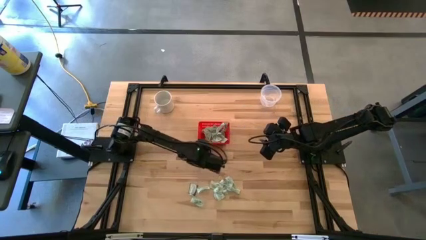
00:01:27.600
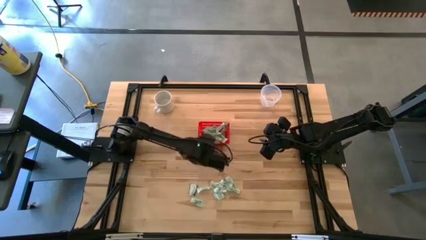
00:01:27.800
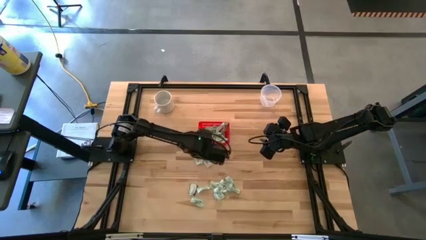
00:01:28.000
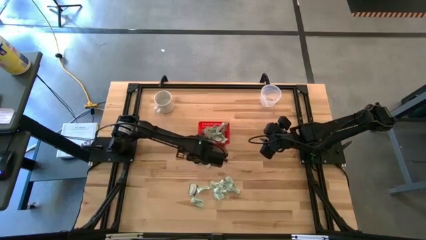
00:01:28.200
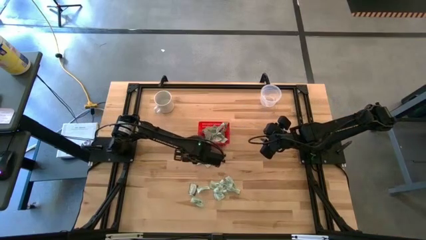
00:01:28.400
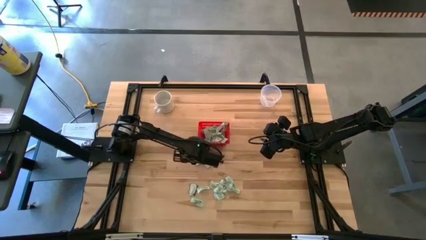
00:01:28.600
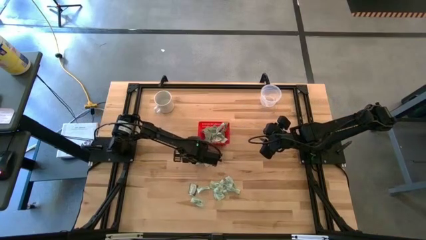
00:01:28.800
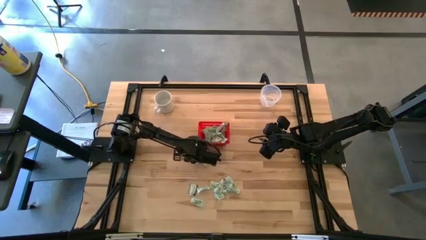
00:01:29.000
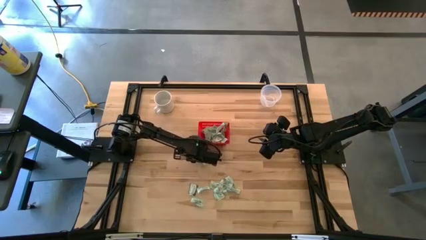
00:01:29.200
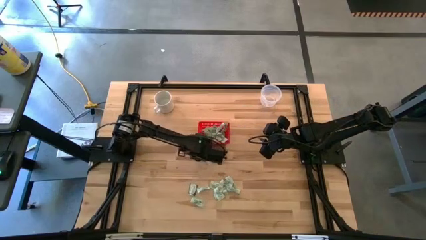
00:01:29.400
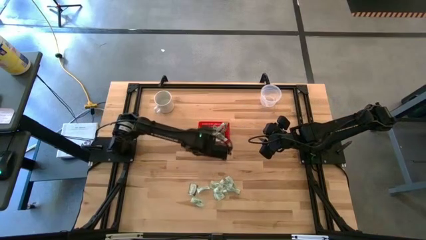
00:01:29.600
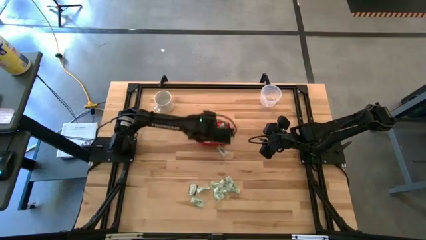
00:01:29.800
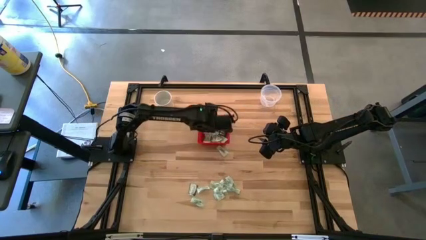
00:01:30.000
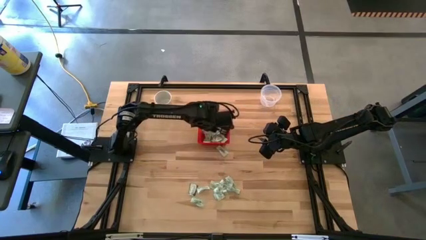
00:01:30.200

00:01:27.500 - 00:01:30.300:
Task: Pick and place items into bin
Put the stevia packet into the red bin

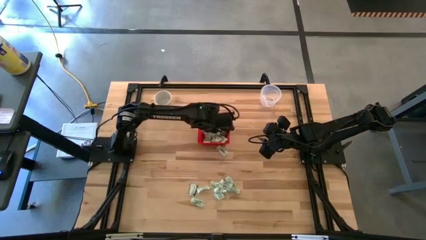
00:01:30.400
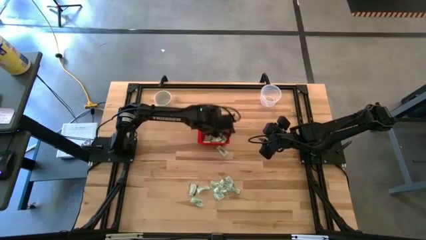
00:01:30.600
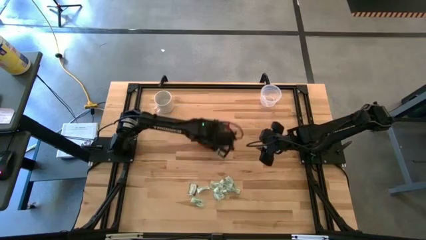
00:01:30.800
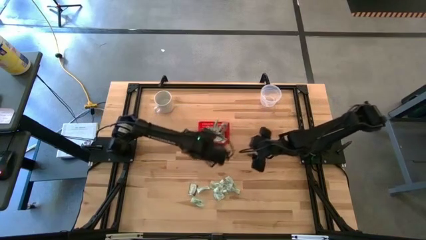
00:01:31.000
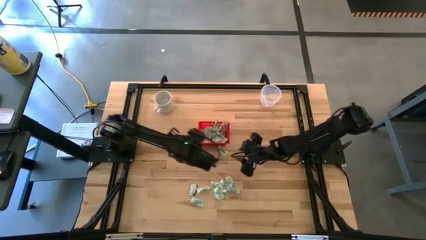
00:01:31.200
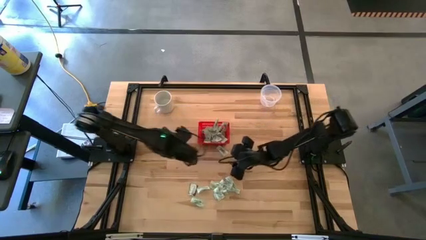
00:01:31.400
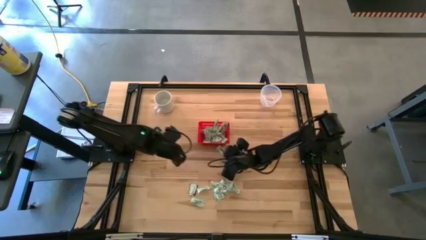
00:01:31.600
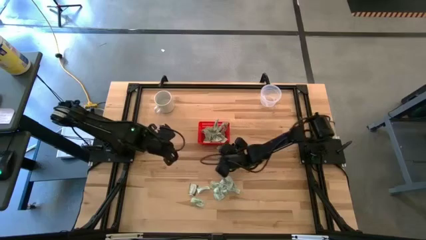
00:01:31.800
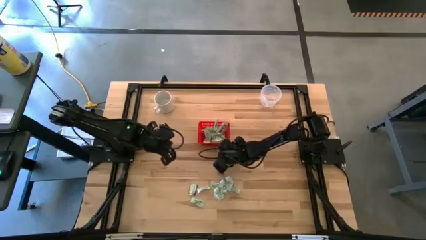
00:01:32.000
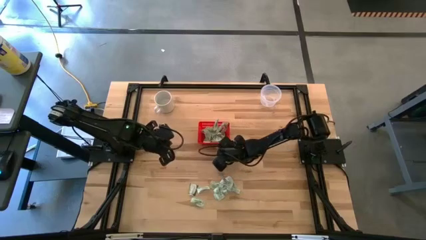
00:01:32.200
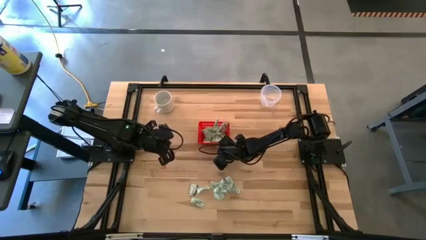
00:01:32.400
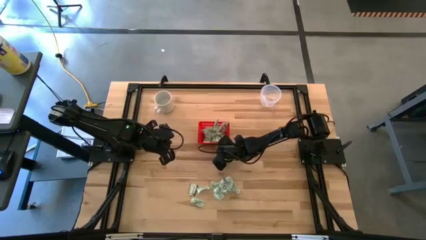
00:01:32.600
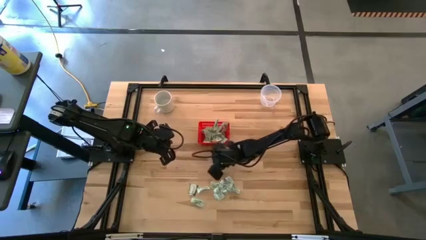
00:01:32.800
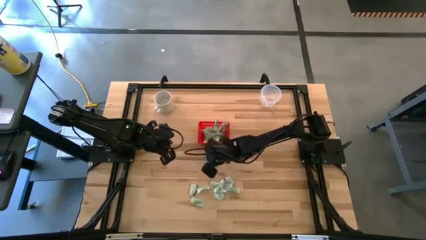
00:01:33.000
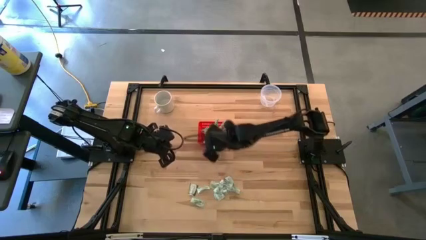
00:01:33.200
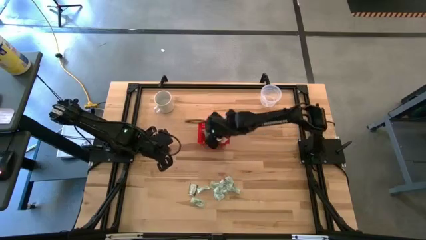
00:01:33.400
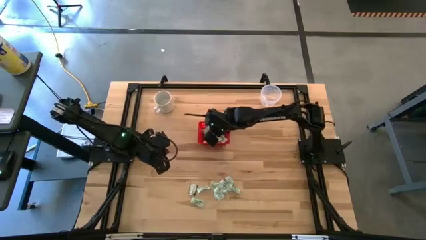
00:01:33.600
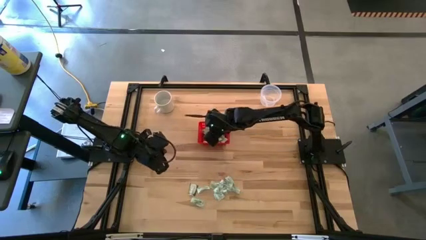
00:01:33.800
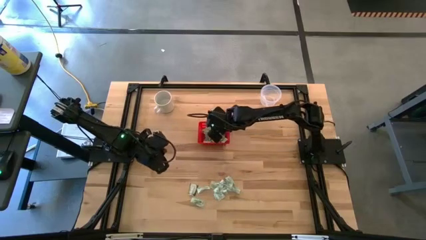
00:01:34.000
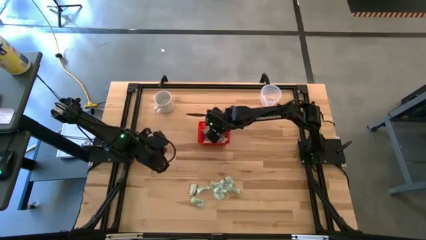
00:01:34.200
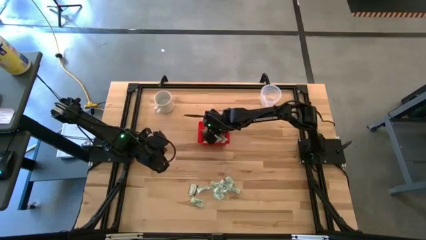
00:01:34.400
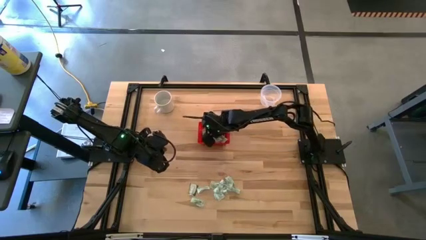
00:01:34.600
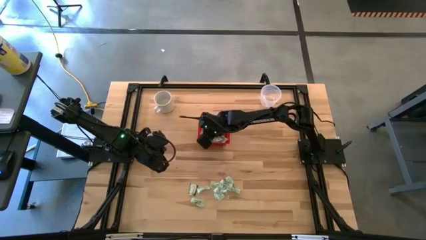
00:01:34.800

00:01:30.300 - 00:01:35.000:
Put the stevia packet into the red bin

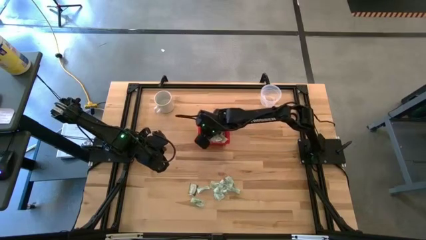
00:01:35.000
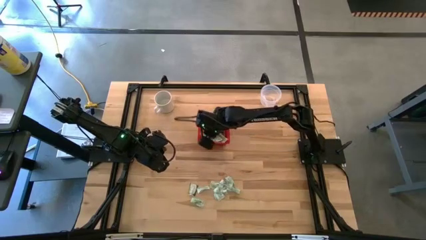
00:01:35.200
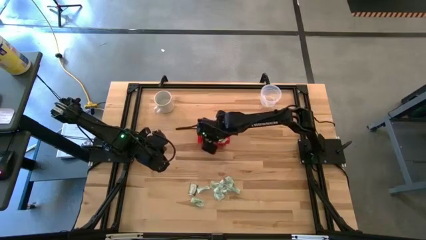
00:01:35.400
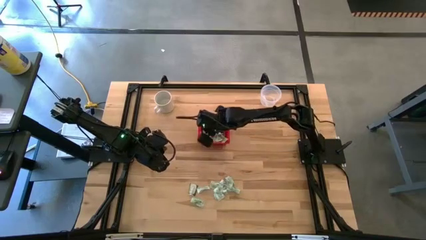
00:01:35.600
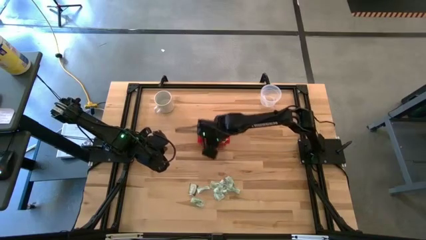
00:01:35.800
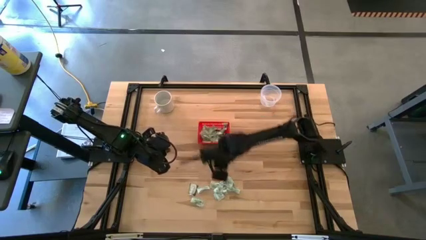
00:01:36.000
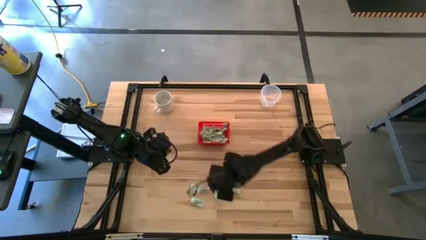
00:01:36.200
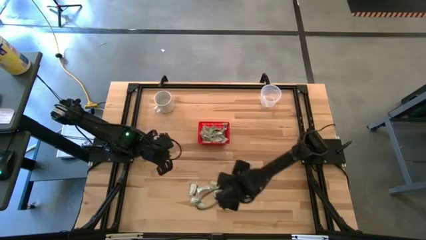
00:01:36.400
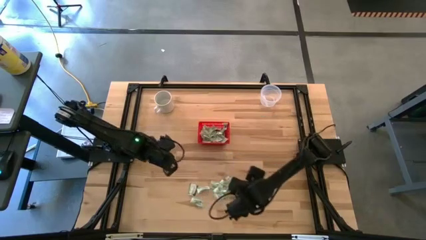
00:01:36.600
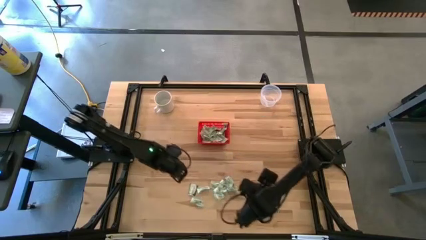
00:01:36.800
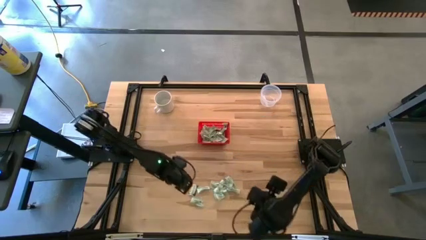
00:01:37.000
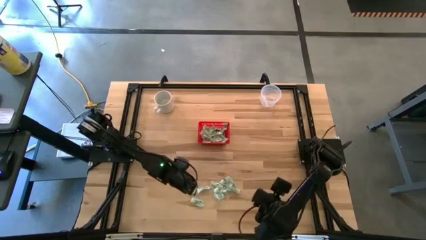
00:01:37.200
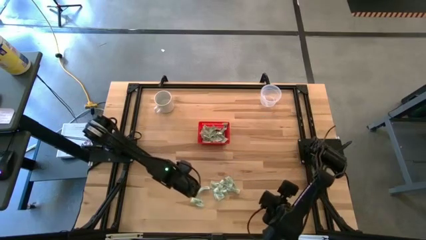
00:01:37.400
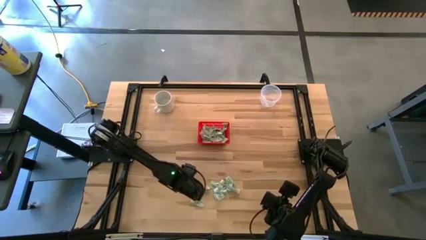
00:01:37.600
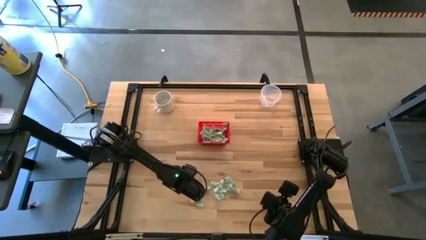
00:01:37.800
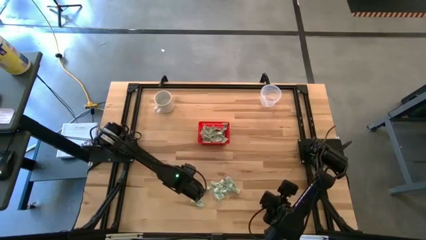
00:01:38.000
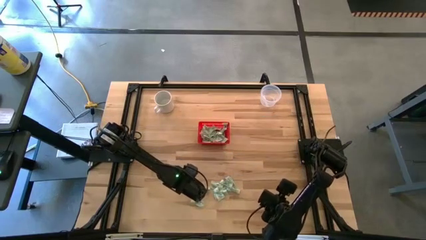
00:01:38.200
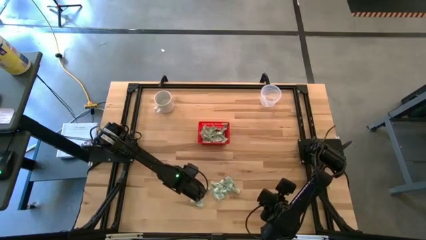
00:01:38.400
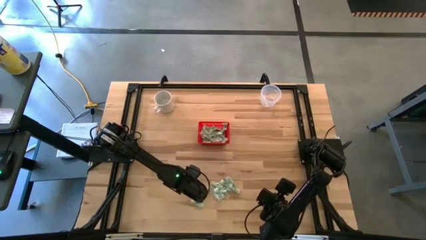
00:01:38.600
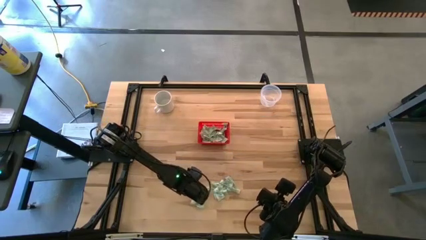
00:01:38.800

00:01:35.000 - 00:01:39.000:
Put the truvia packet into the red bin

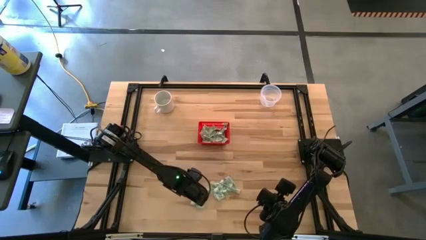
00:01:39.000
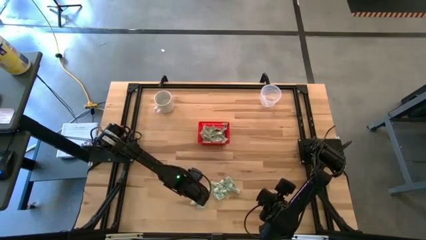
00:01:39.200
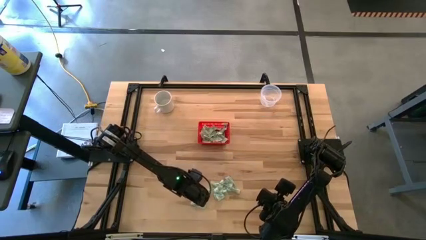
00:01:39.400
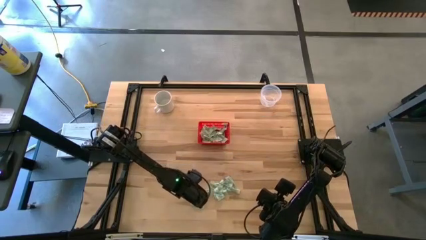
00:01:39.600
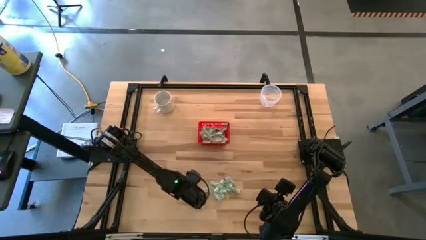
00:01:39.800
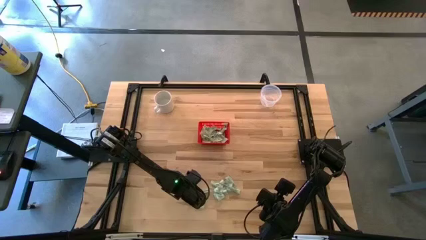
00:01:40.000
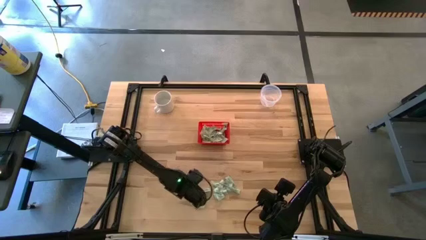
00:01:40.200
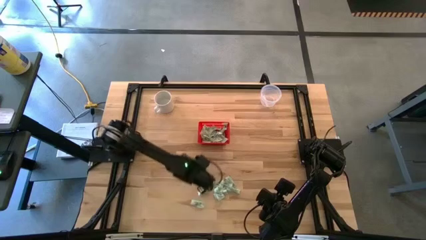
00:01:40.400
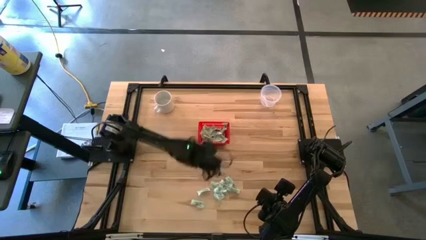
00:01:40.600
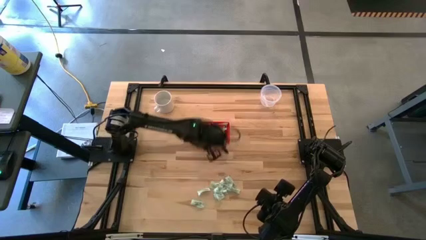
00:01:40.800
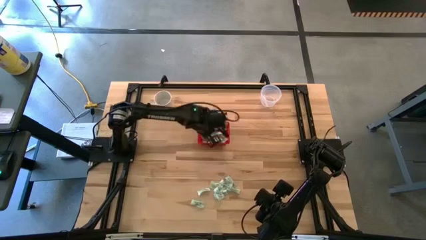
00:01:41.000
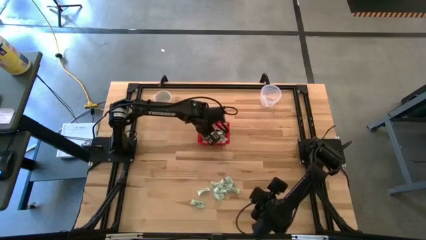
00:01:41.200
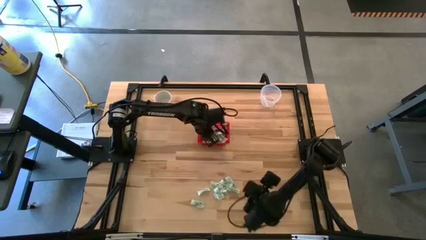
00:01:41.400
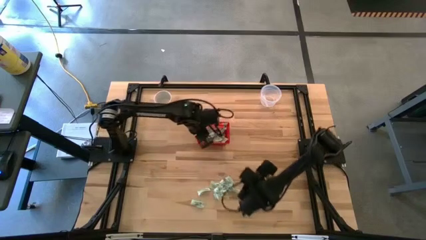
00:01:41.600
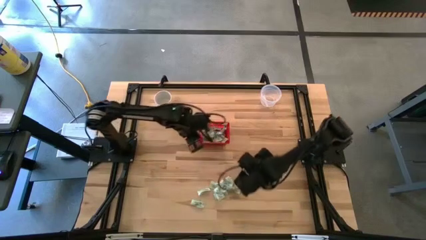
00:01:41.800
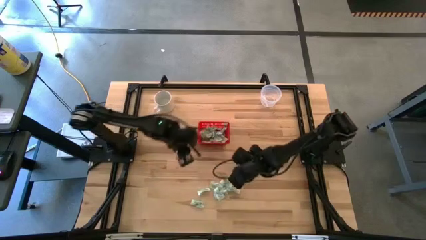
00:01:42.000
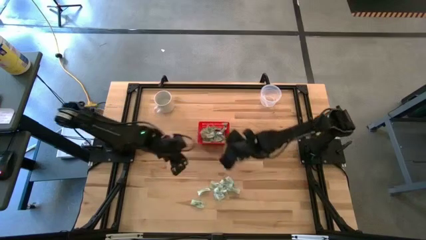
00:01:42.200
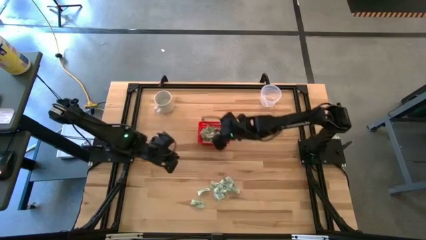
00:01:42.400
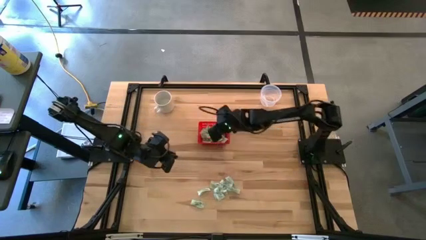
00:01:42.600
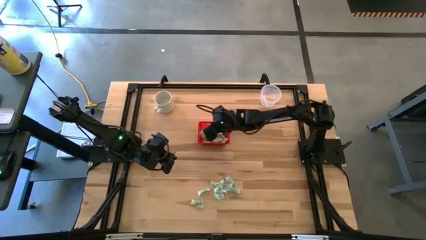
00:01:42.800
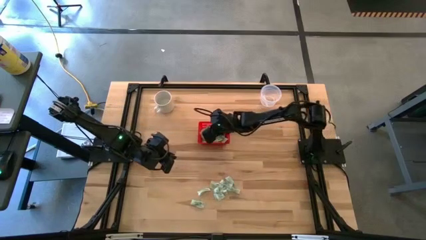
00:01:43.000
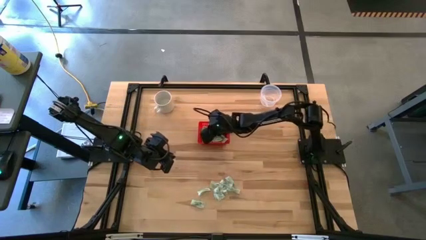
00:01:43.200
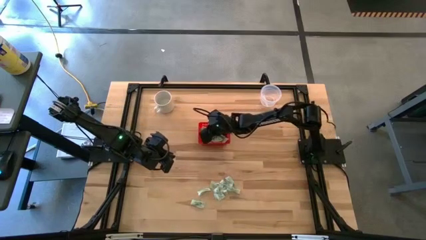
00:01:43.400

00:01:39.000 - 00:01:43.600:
Put the truvia packet into the red bin

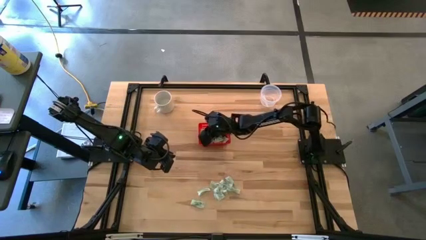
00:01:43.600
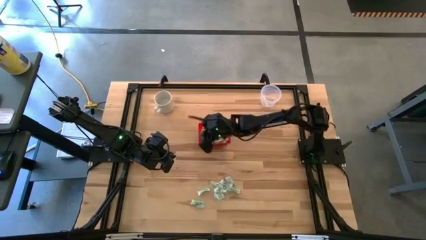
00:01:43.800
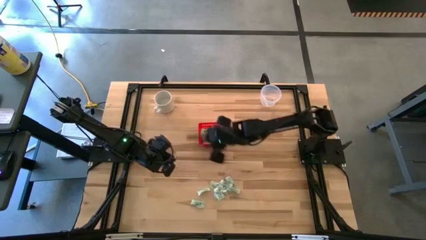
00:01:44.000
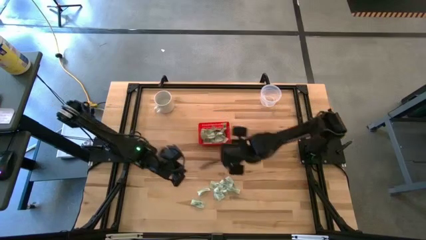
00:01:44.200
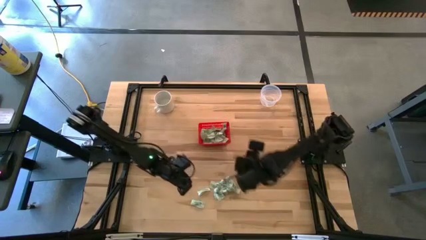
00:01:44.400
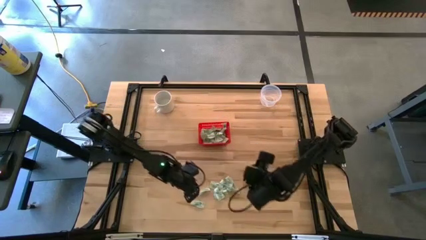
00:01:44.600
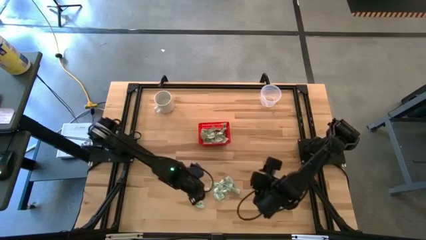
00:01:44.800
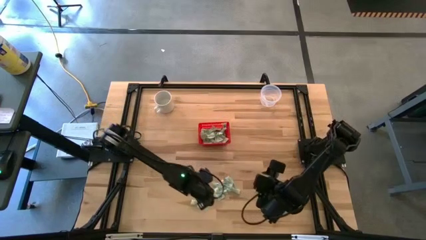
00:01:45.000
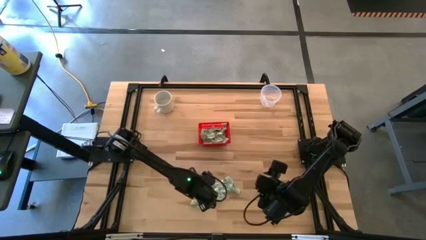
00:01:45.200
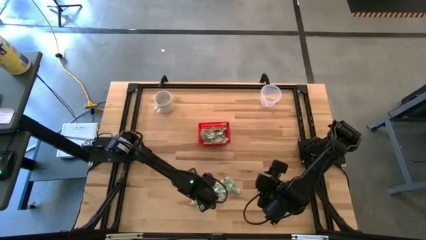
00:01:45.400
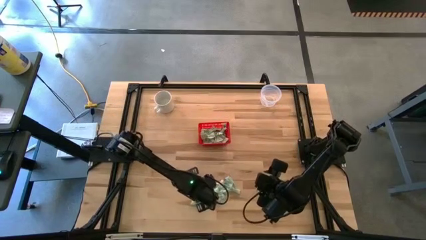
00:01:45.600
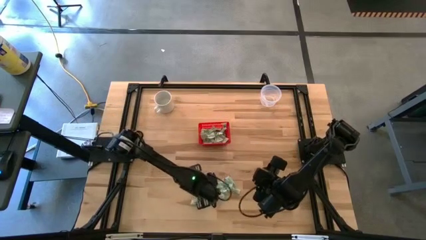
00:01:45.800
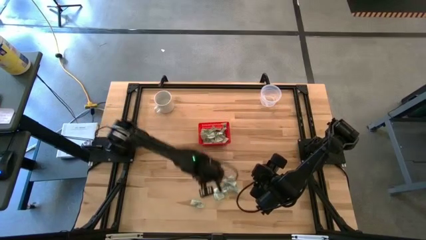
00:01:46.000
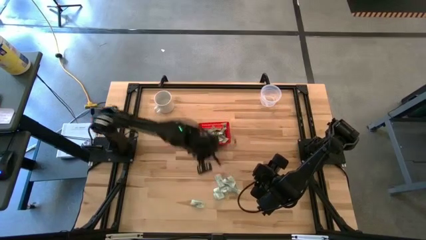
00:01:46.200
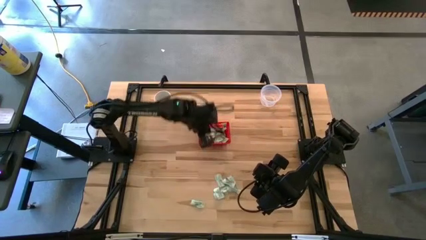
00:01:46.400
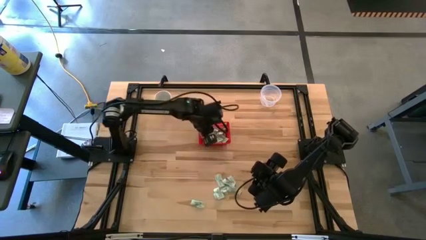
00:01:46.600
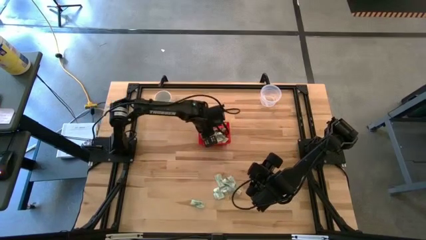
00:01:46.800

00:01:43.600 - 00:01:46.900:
Put the stevia packet into the red bin
